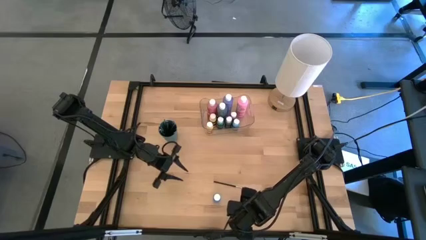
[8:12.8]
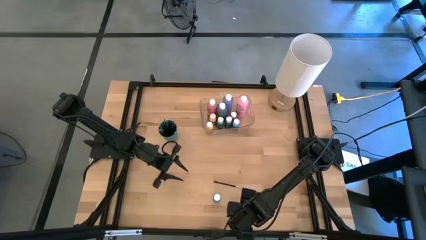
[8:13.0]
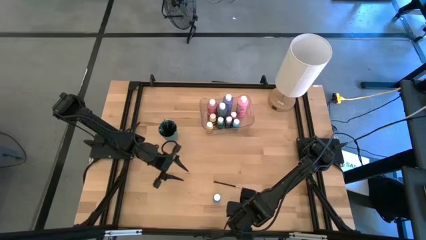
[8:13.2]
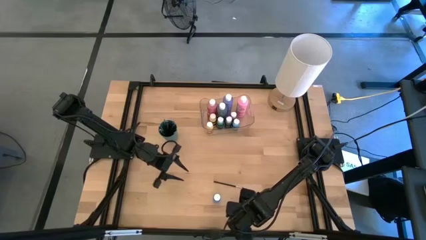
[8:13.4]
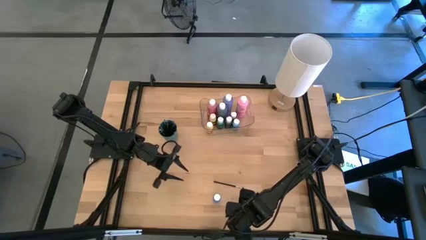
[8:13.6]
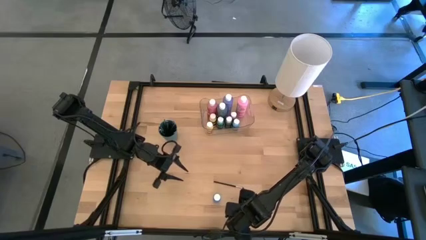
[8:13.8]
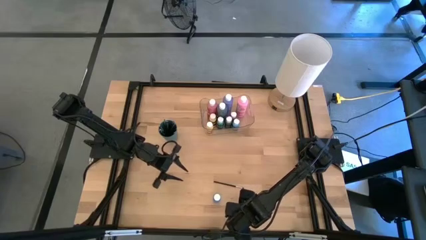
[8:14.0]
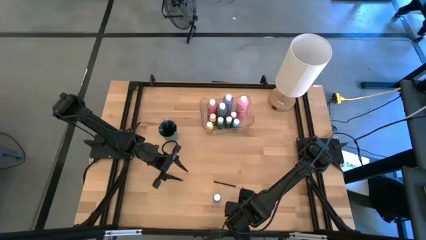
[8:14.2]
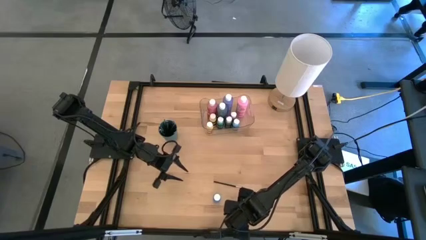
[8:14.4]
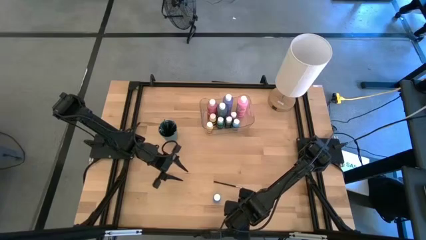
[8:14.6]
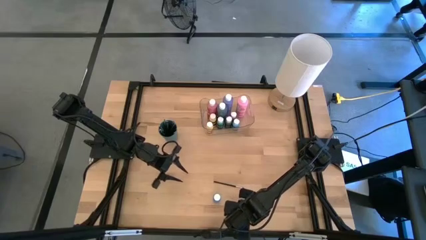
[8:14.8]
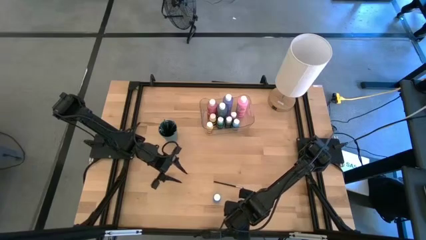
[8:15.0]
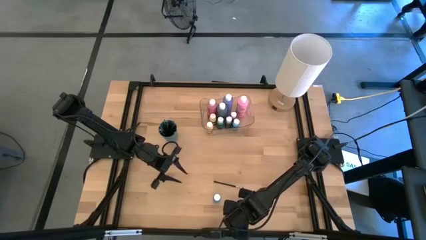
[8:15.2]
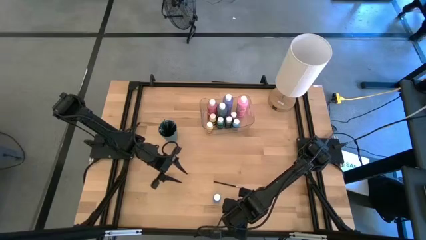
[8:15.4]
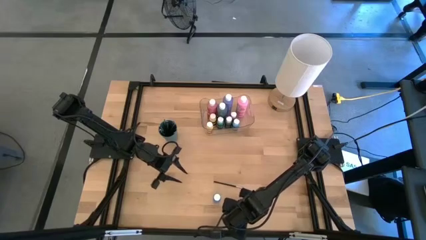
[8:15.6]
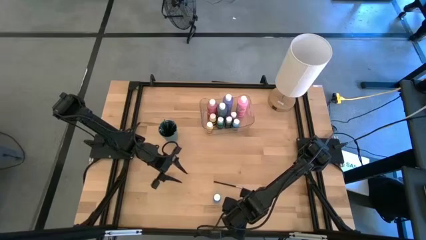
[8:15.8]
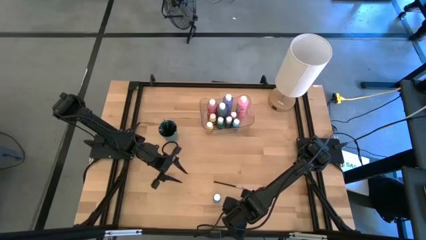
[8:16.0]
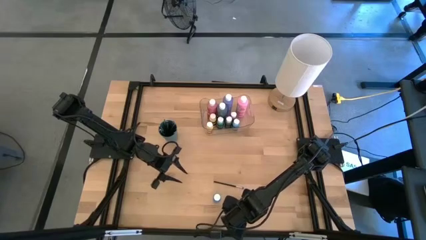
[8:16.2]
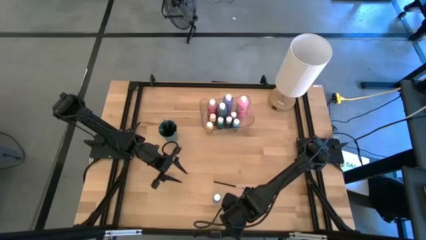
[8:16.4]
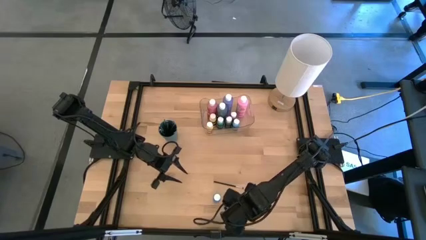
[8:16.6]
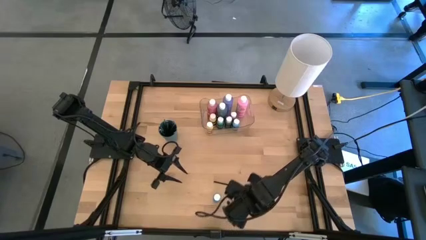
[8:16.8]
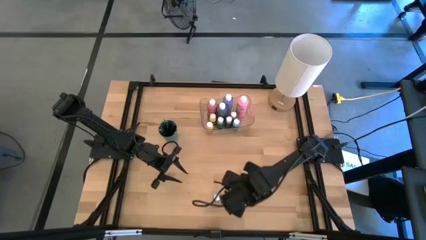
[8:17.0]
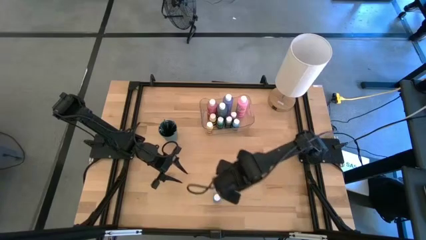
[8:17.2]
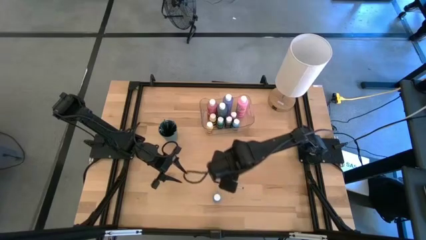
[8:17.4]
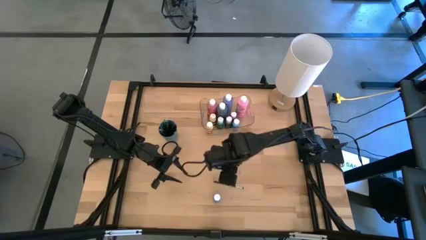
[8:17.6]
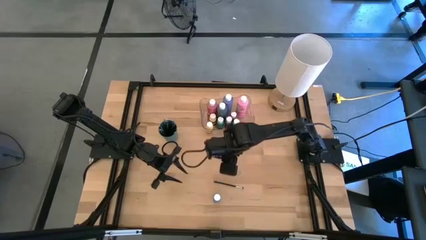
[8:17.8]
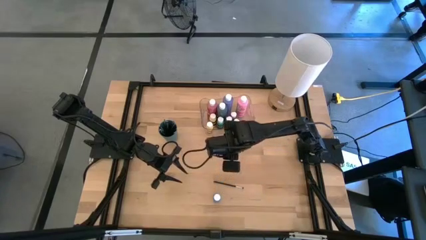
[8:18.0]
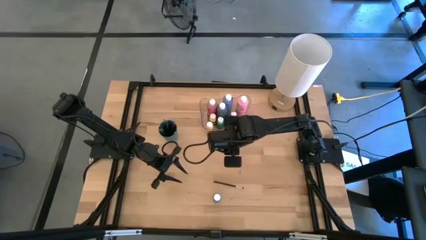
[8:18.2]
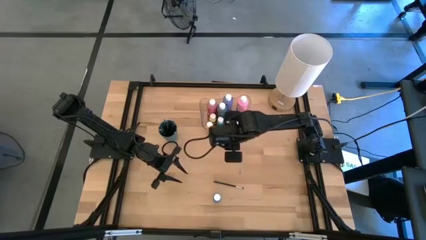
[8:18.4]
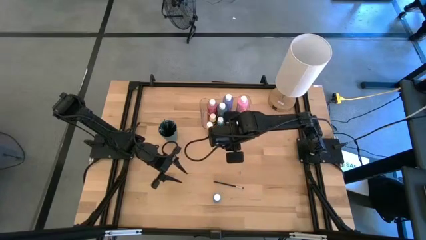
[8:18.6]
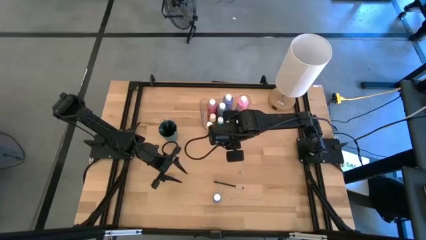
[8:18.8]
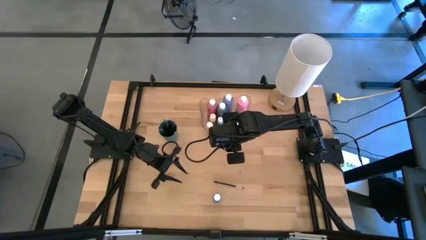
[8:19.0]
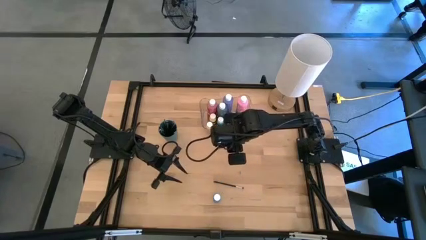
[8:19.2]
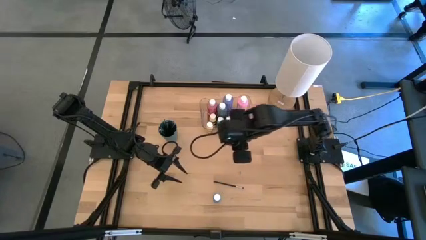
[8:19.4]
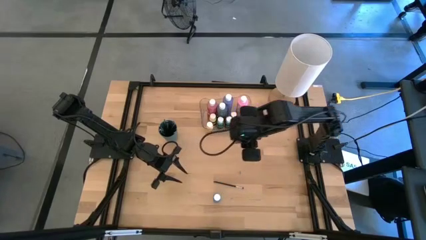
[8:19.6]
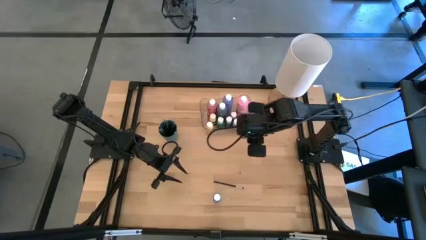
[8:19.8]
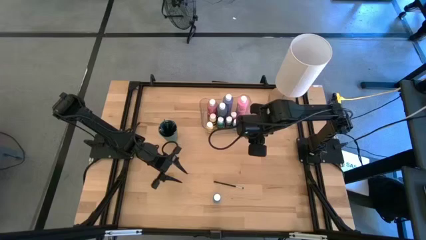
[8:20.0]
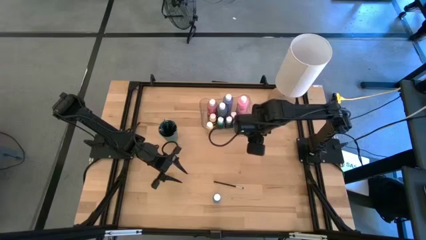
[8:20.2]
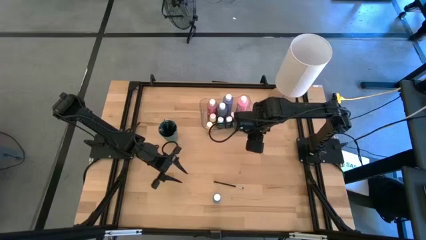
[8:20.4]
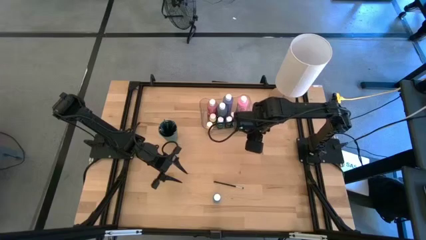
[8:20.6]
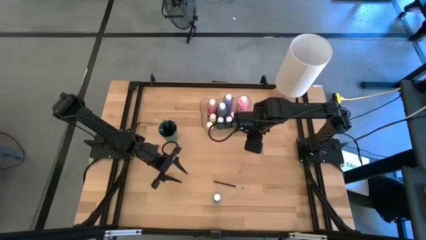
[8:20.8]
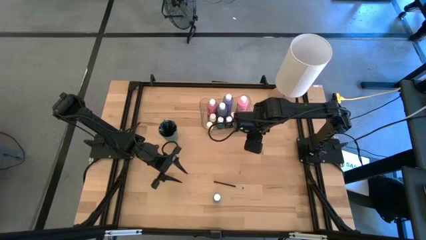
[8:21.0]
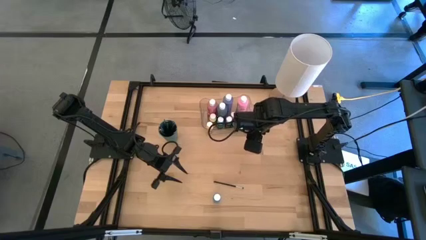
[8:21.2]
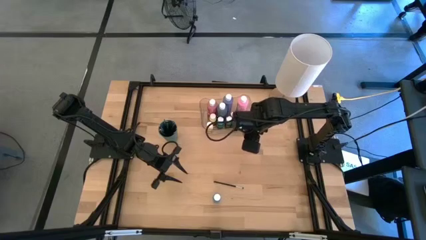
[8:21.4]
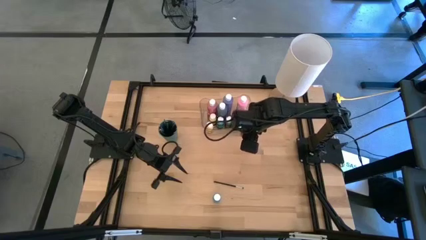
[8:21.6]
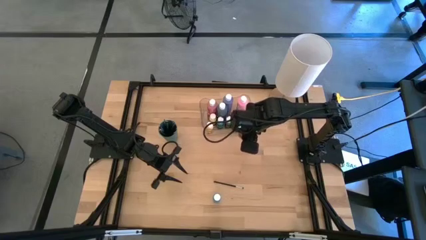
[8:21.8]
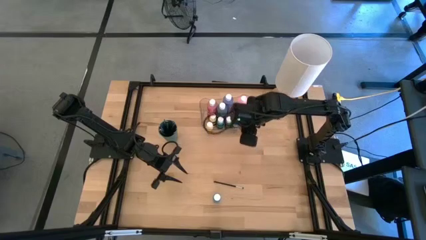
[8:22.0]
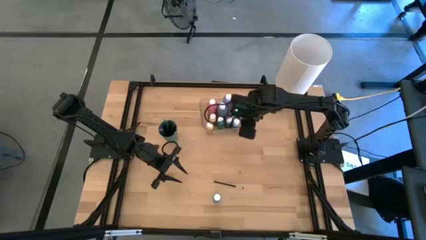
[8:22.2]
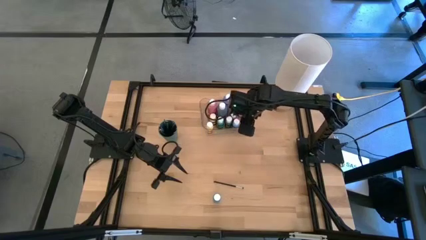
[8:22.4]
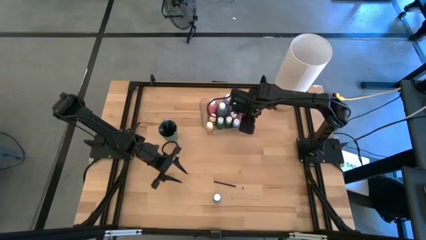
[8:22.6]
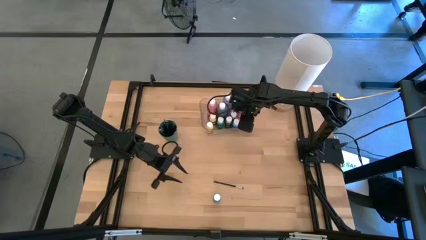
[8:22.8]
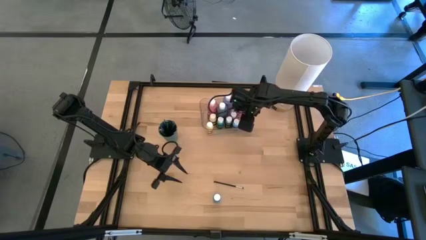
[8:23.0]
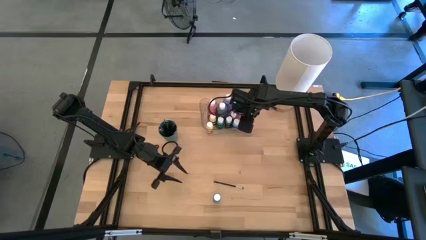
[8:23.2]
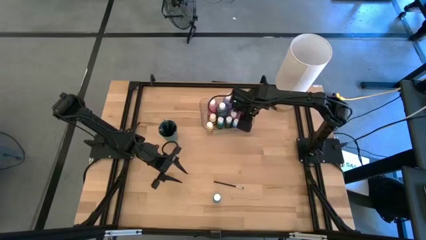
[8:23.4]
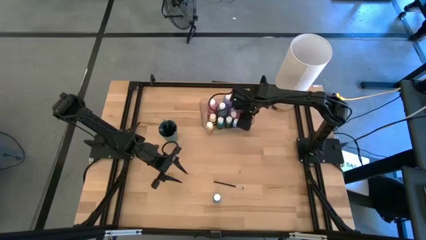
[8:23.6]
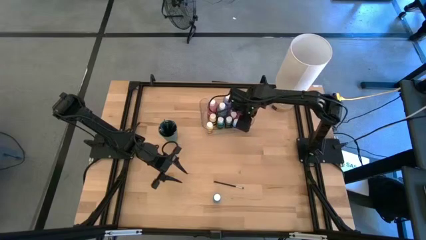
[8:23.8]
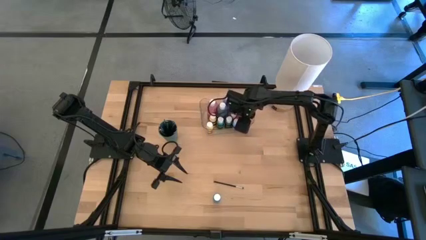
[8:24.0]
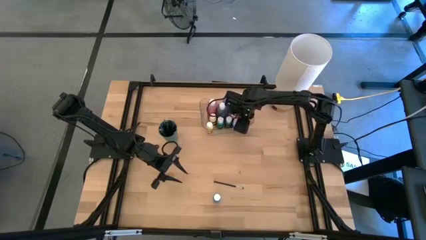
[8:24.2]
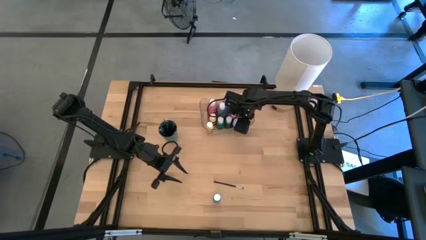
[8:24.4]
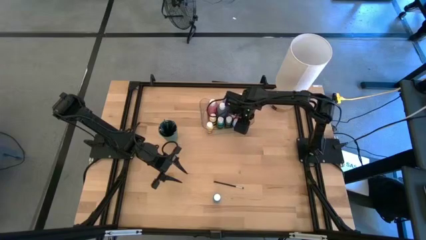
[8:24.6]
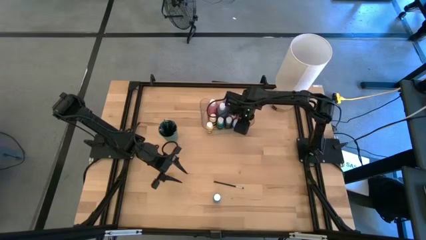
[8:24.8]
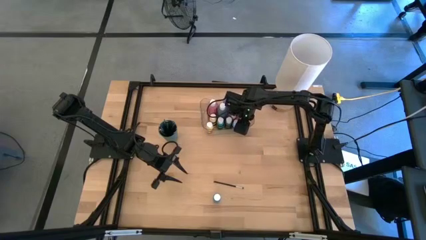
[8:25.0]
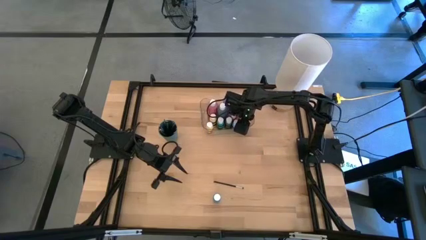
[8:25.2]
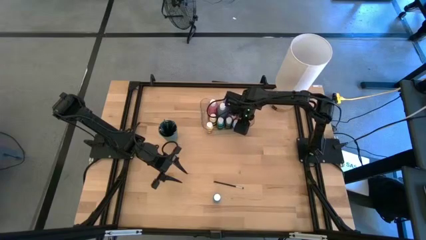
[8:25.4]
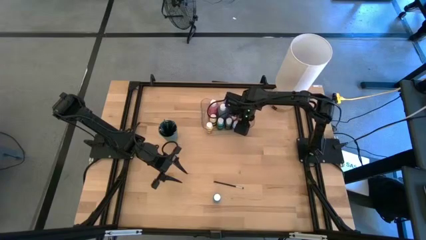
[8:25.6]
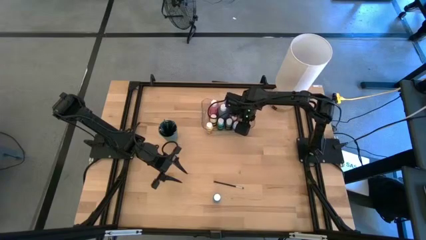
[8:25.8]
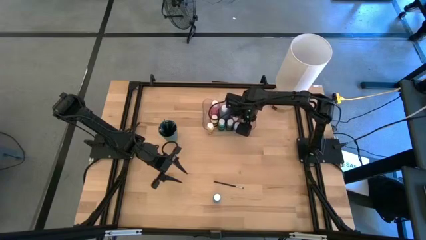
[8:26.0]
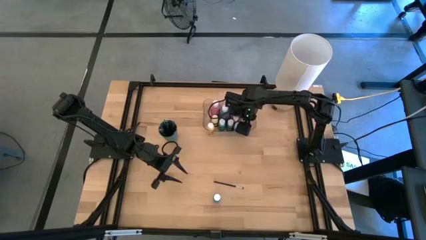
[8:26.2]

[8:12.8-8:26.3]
Task: Pick & Place Paint Supplies
Put the red paint bottle into the transparent bin

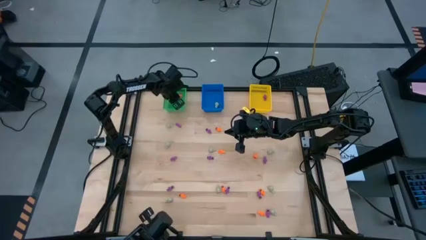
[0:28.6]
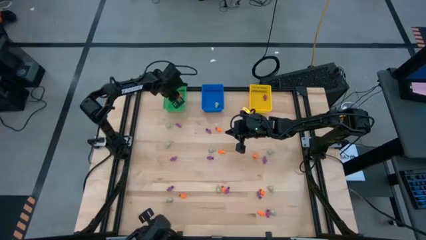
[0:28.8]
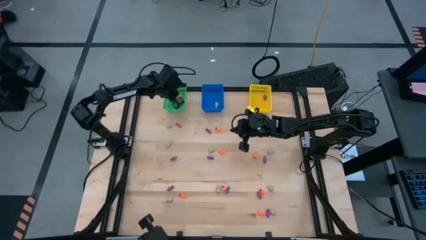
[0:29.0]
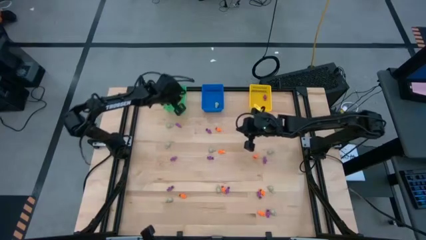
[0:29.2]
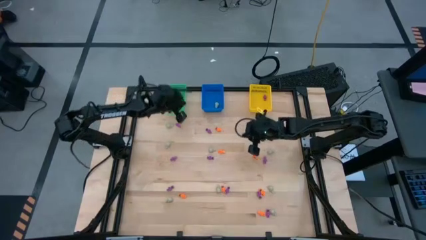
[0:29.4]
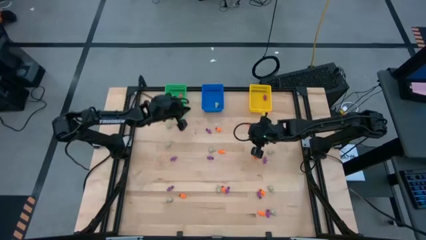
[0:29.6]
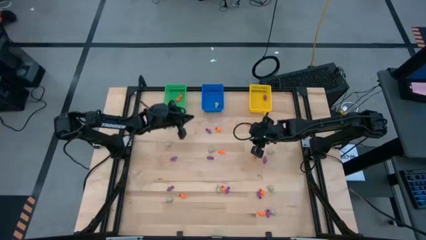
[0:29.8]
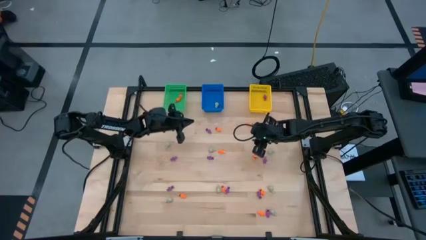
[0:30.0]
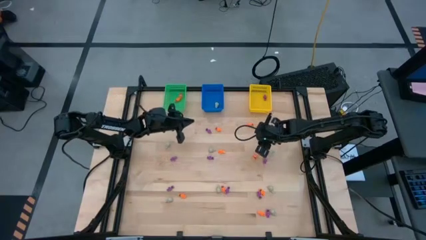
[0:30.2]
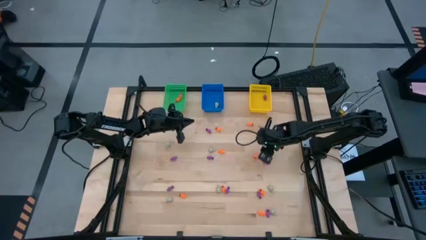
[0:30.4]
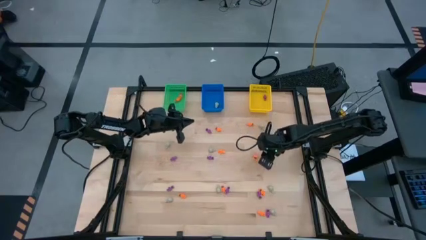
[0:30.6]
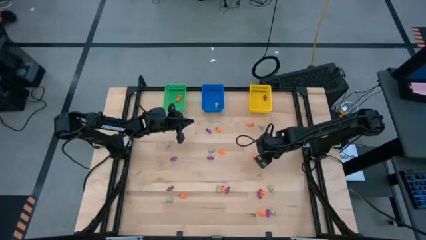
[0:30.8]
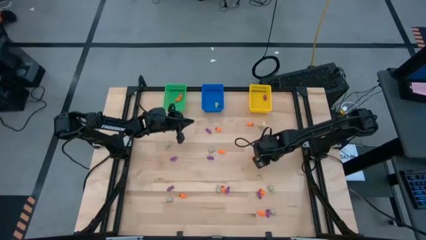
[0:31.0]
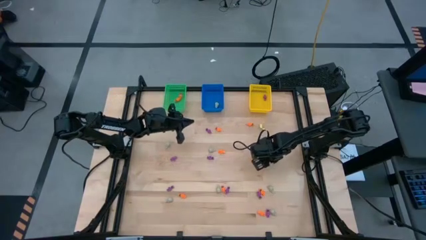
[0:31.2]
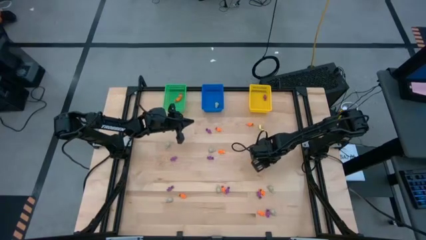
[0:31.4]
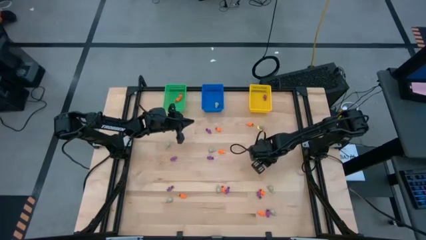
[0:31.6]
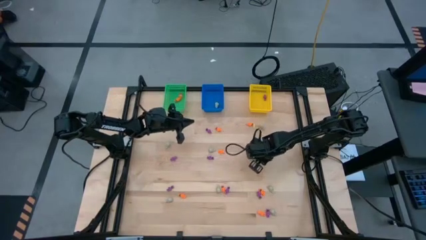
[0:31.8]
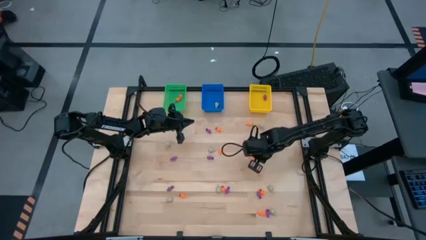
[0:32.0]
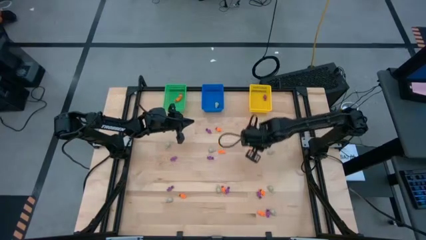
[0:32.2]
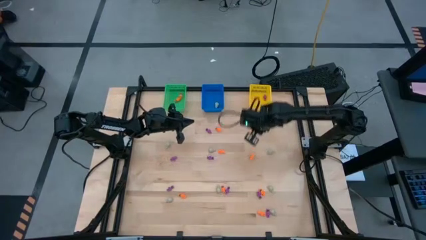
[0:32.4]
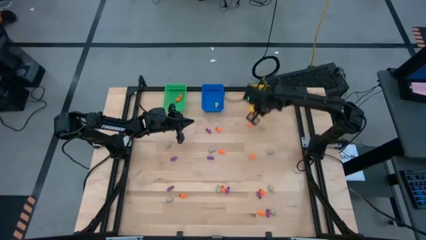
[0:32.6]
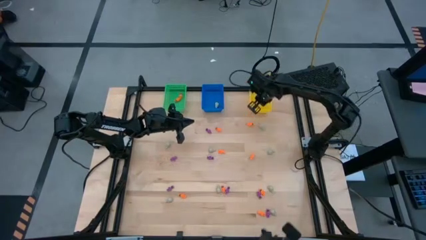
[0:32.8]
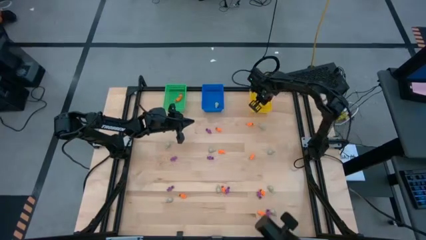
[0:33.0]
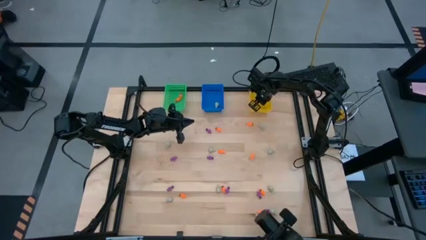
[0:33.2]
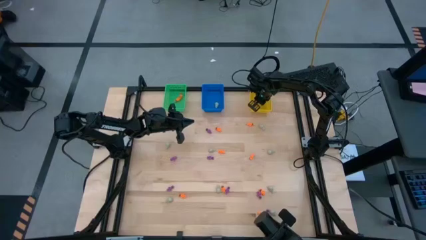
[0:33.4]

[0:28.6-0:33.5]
Task: Sort Halloween decoration
Put the purple skeleton toy into the yellow bin
